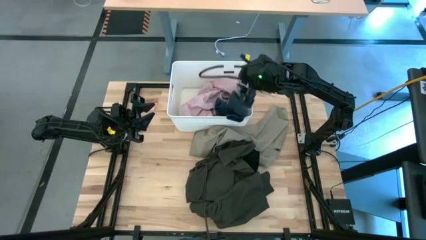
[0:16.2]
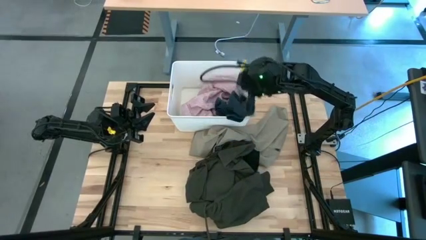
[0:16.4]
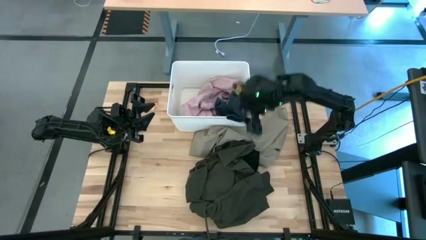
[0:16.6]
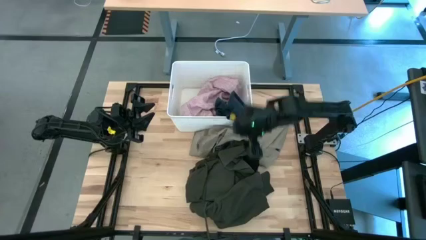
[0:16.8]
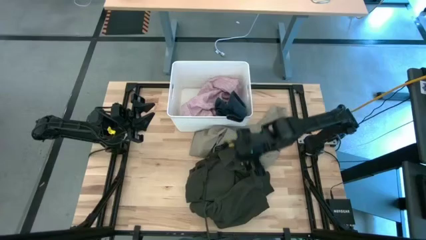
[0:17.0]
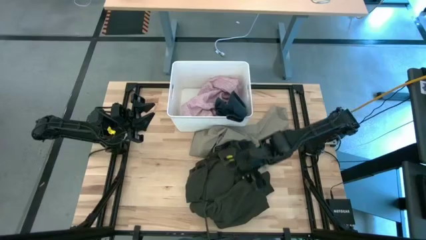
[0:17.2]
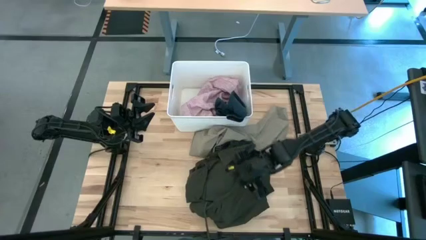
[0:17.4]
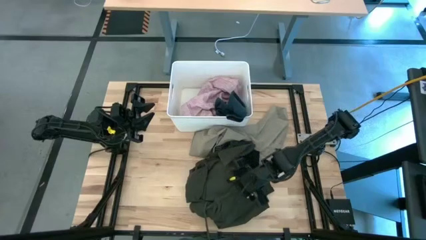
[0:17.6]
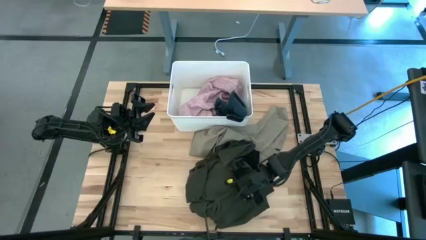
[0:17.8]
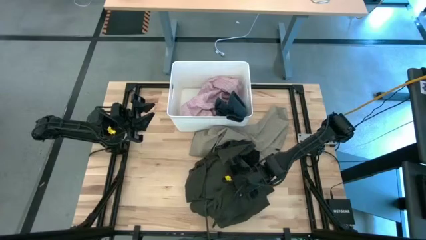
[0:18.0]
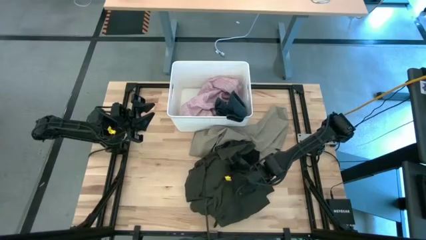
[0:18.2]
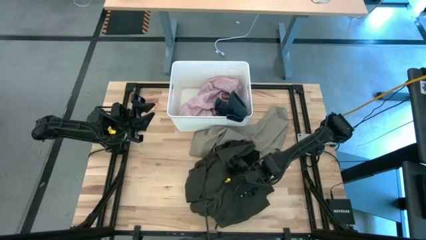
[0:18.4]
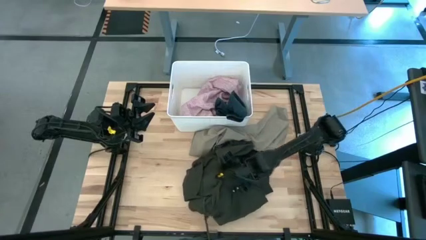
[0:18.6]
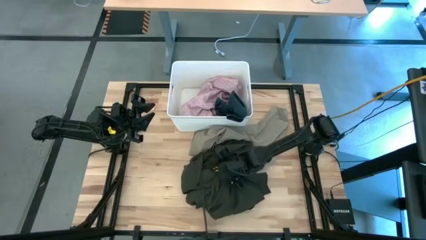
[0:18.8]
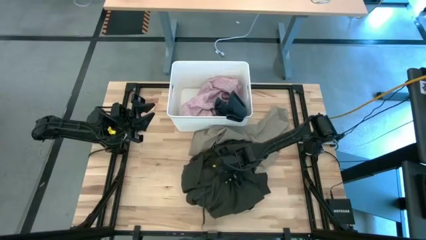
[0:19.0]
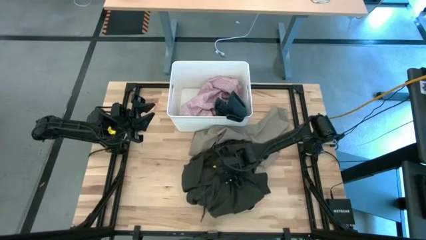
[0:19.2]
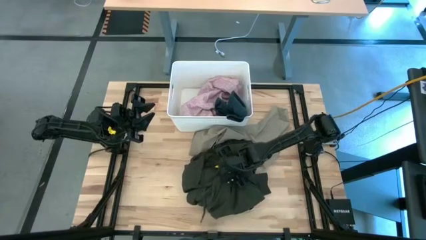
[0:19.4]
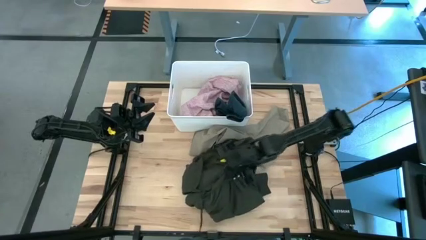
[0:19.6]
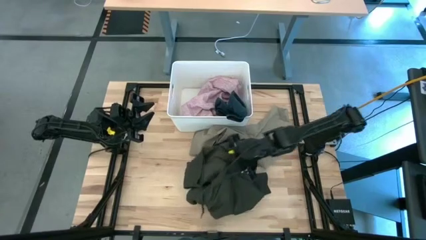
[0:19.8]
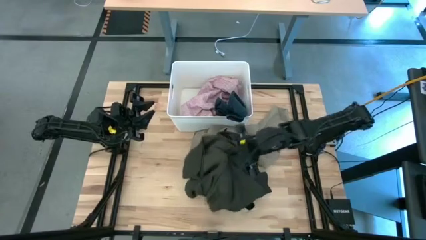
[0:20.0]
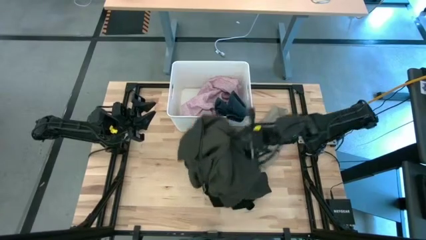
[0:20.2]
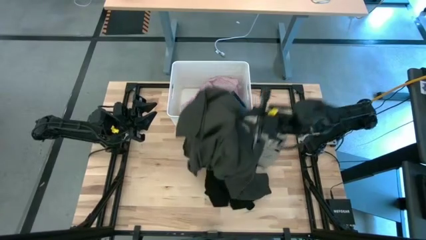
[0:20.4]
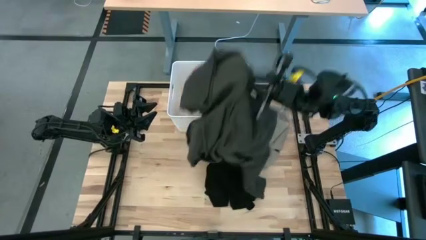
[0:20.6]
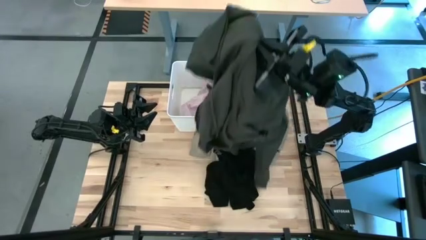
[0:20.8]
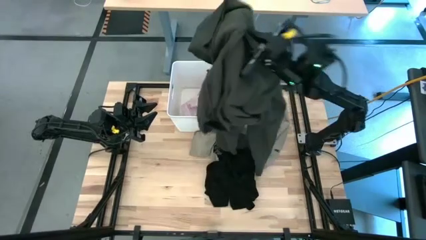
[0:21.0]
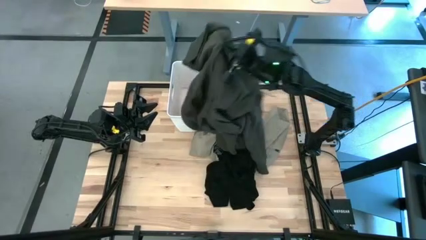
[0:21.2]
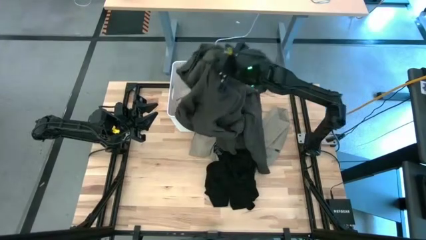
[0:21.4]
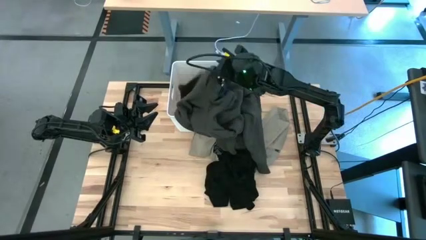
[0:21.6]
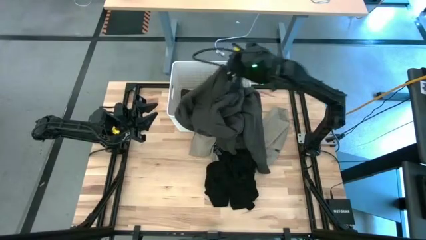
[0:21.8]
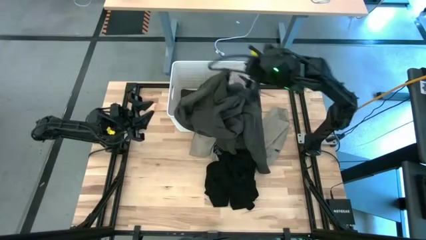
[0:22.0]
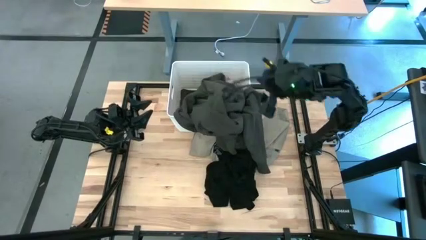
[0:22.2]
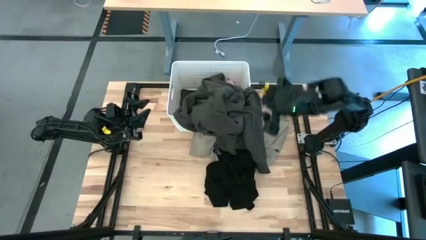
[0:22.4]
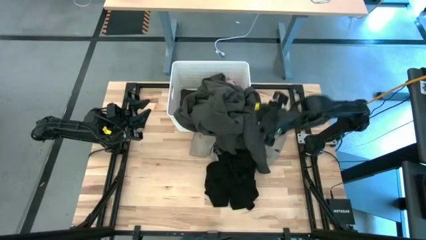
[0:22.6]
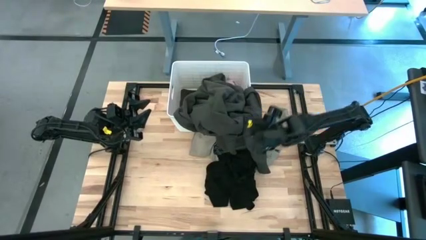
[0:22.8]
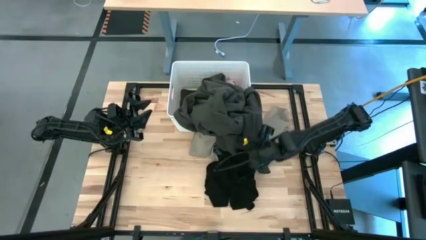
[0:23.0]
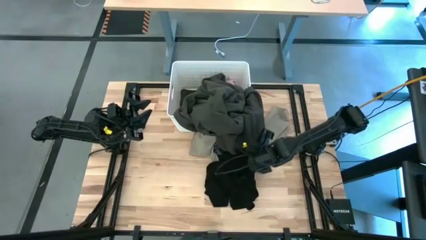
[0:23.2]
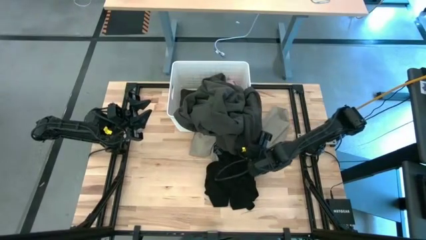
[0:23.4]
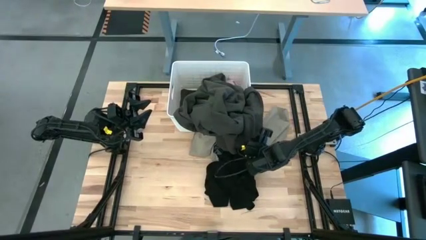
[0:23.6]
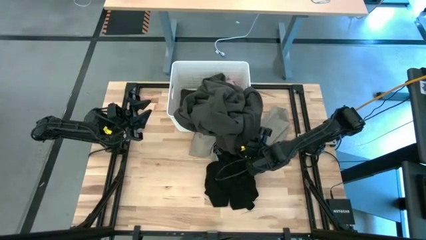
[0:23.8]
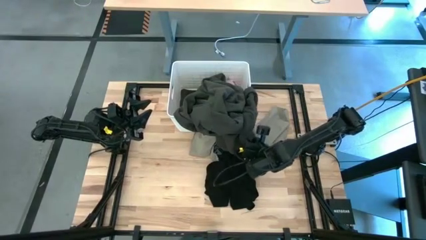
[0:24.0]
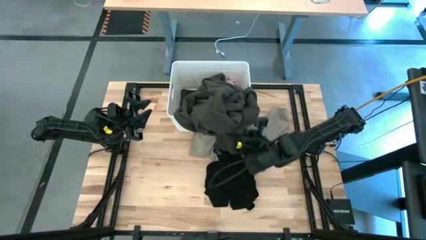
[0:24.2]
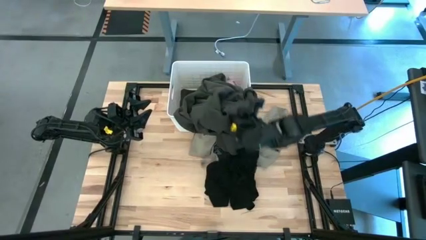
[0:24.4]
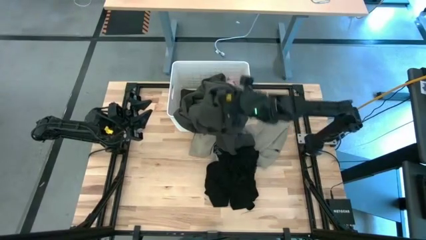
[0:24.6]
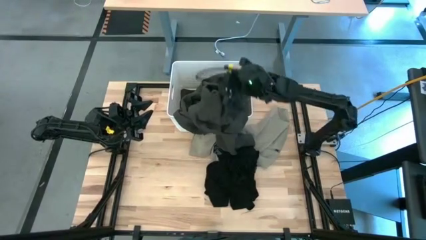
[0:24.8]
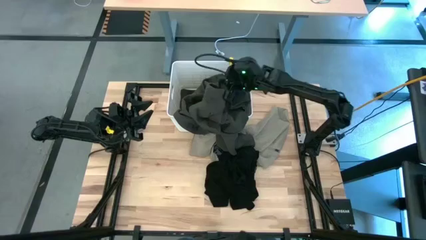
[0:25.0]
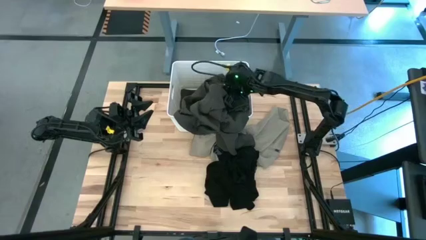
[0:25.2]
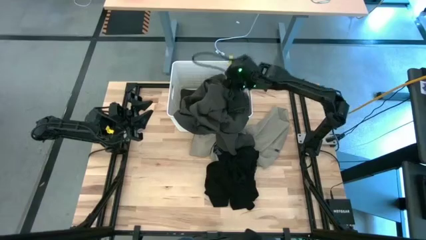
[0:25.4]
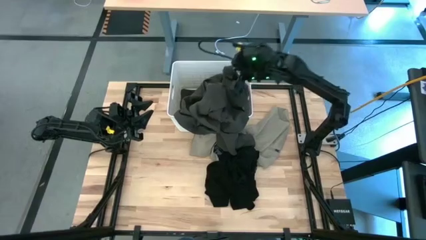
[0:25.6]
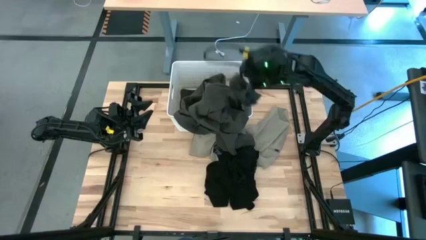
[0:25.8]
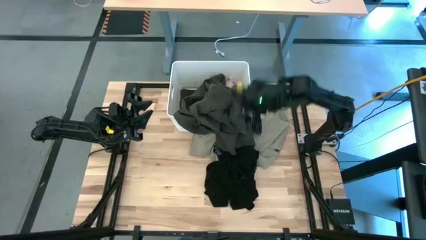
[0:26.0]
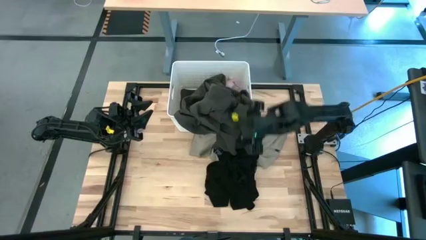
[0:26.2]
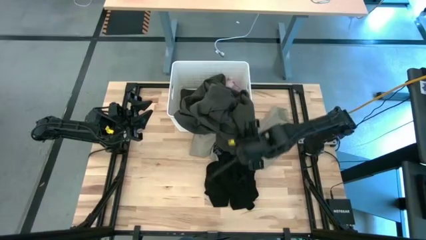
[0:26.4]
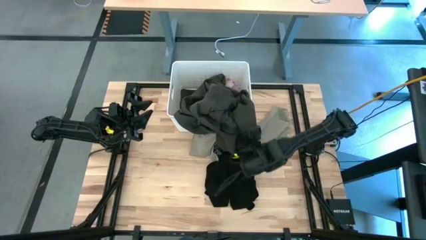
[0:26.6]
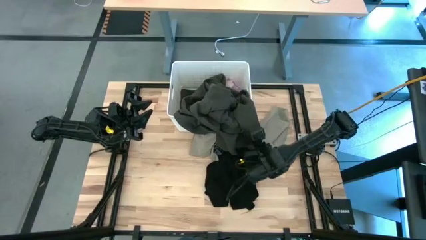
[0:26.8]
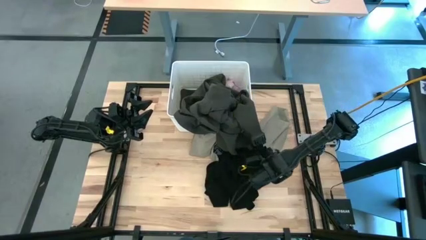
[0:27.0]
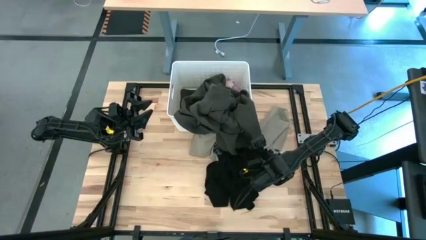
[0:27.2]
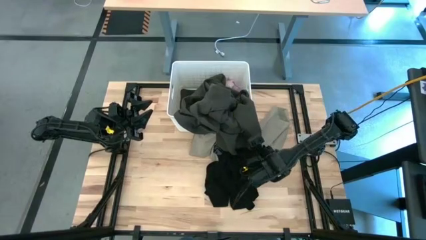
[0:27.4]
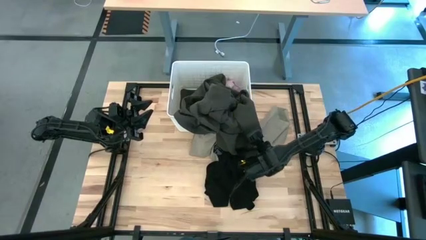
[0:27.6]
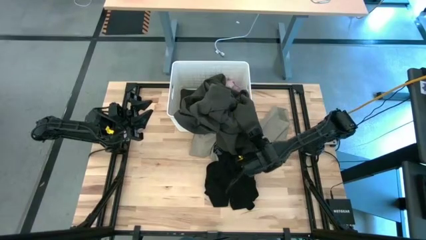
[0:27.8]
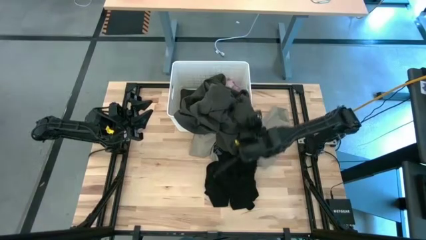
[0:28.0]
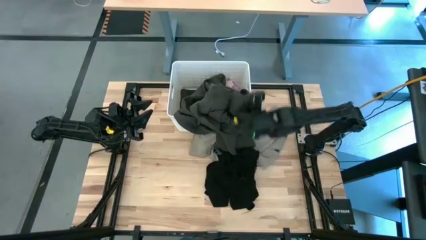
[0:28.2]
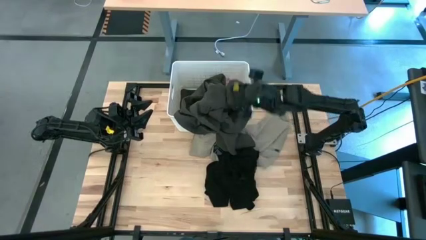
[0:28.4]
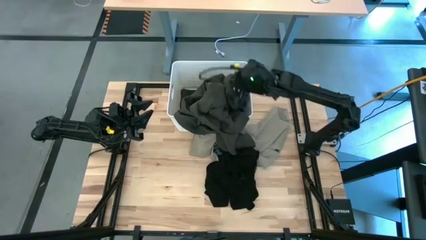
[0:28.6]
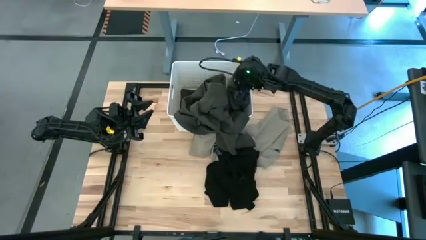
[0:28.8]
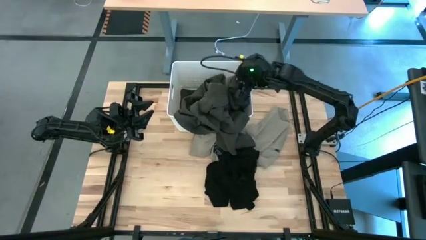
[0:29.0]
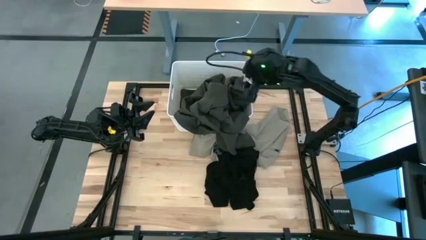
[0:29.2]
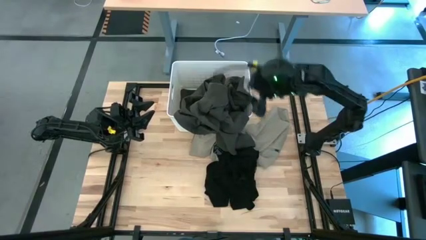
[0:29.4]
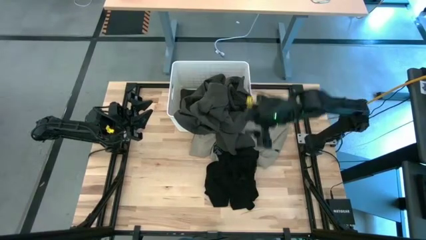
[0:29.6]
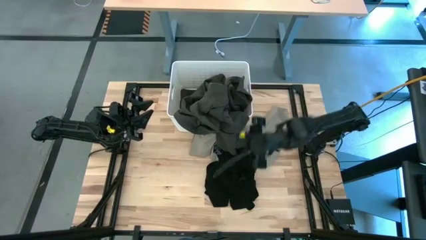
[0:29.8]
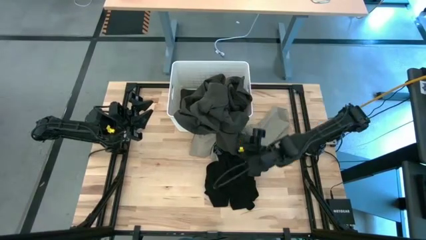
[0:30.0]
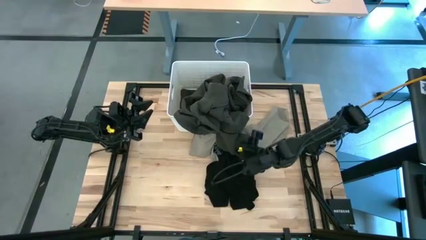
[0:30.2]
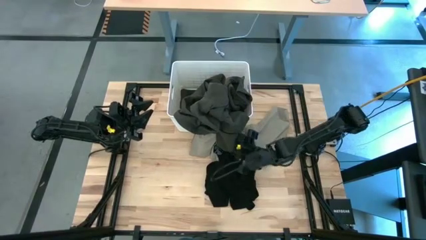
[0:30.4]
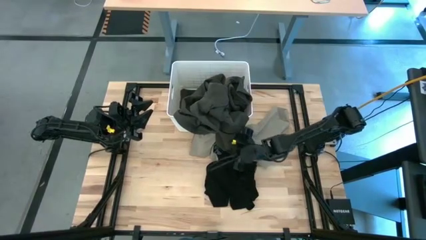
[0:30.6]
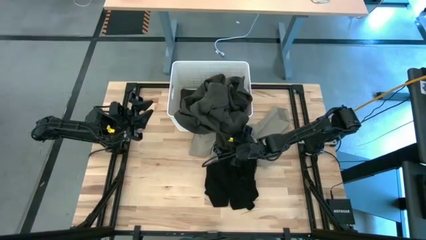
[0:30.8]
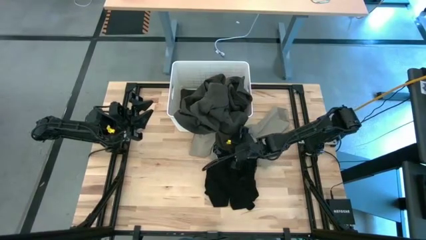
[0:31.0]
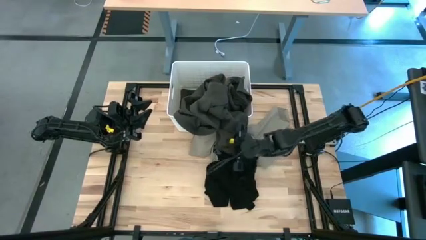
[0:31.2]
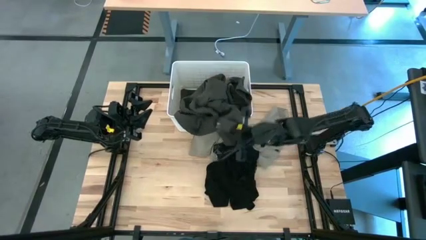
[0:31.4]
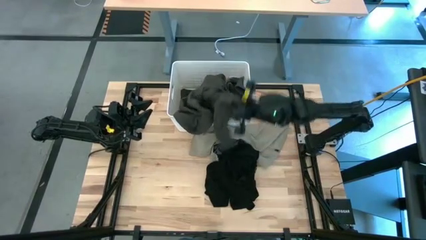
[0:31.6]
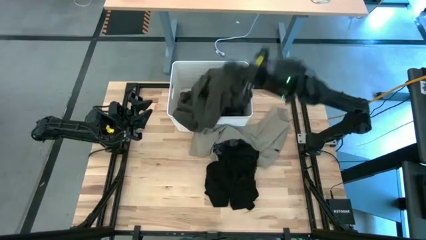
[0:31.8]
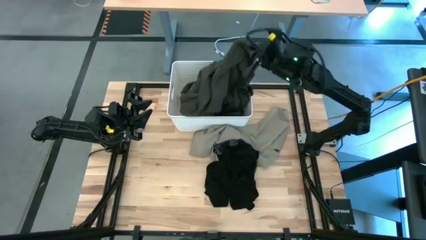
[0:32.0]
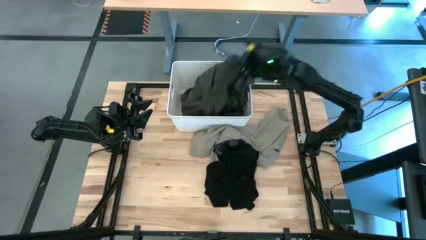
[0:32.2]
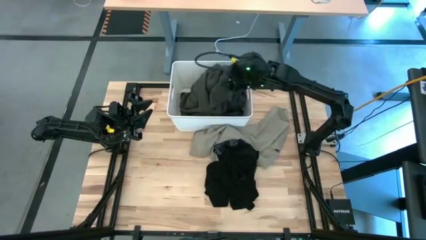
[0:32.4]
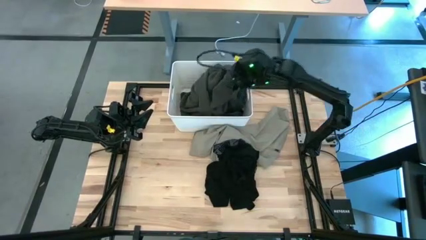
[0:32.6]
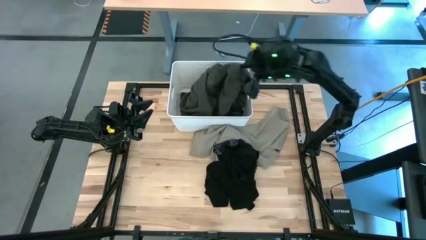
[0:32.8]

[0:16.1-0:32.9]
Task: Sort clothes
Put the gray sweater into the white bin
